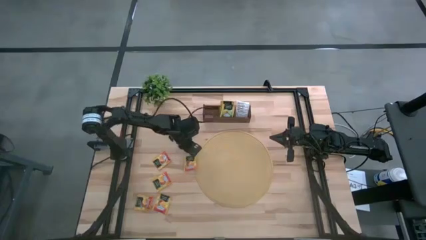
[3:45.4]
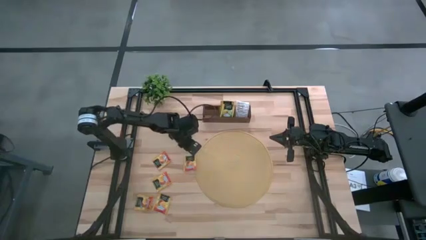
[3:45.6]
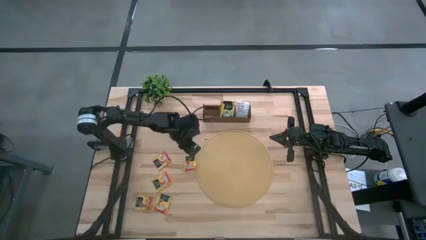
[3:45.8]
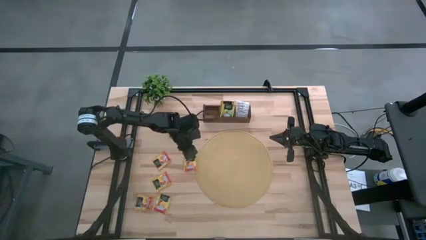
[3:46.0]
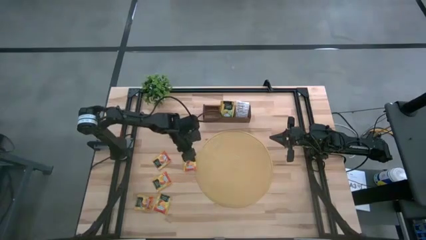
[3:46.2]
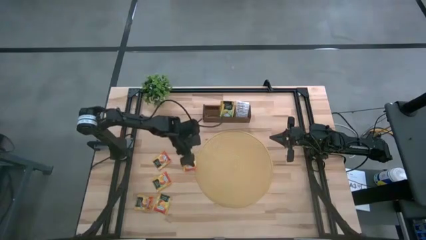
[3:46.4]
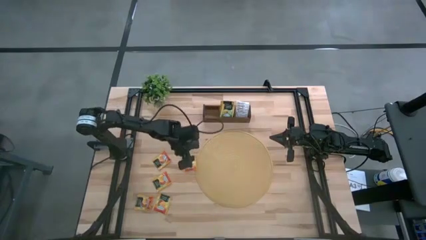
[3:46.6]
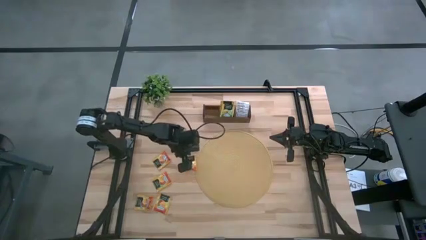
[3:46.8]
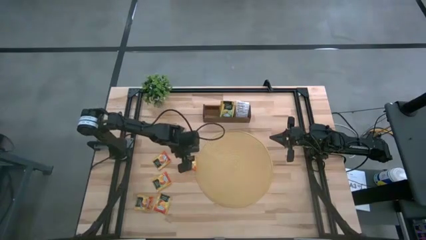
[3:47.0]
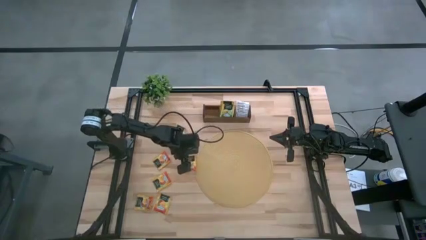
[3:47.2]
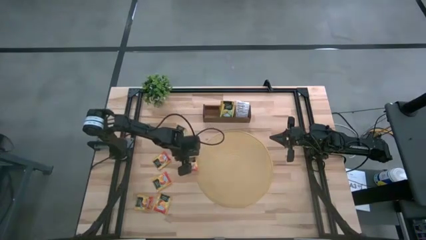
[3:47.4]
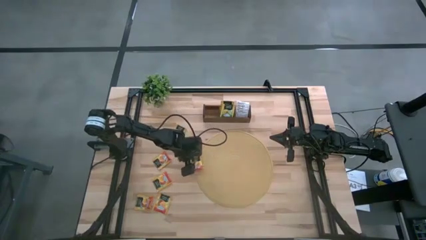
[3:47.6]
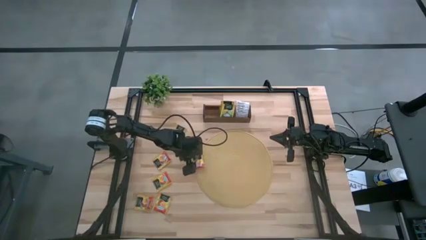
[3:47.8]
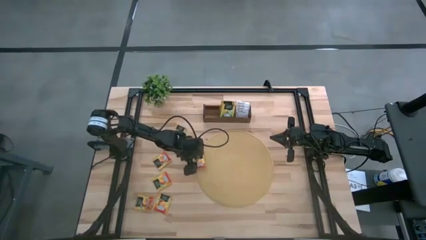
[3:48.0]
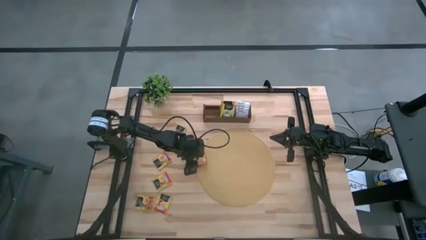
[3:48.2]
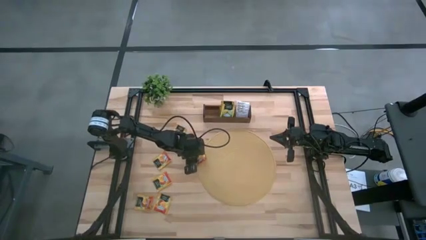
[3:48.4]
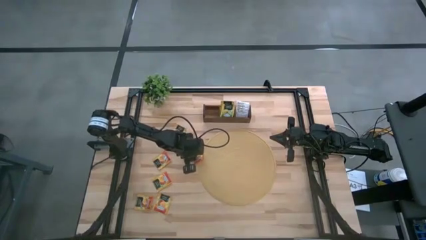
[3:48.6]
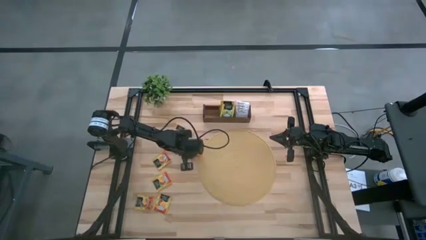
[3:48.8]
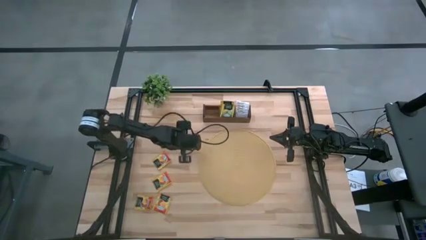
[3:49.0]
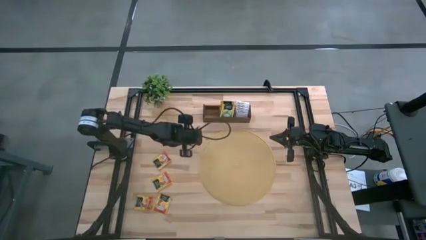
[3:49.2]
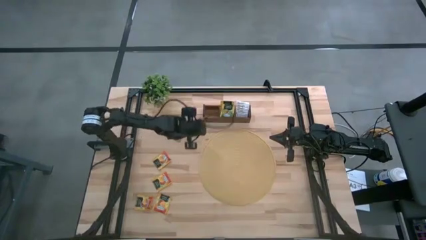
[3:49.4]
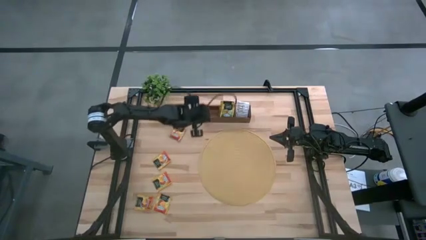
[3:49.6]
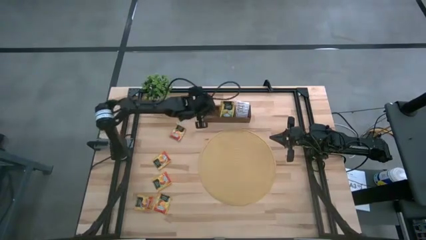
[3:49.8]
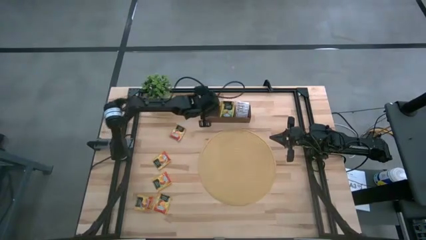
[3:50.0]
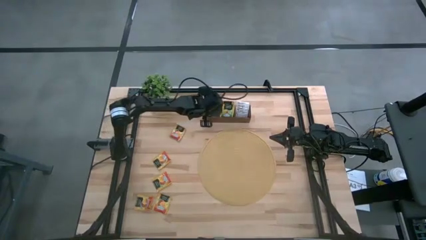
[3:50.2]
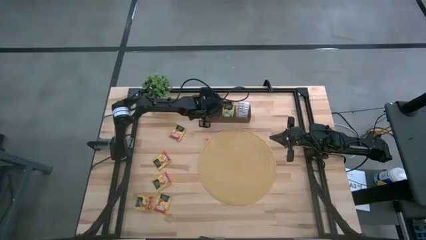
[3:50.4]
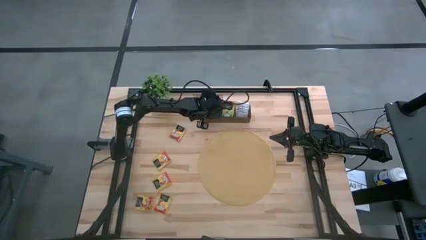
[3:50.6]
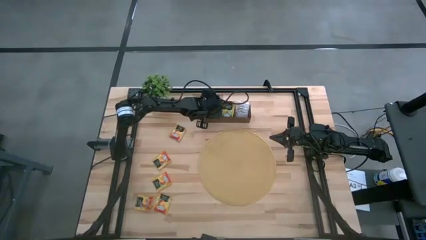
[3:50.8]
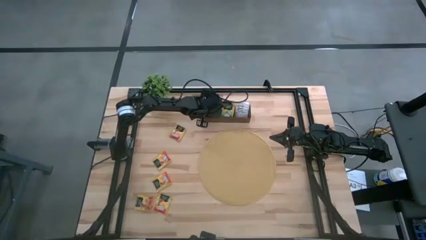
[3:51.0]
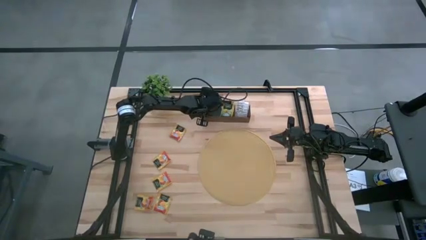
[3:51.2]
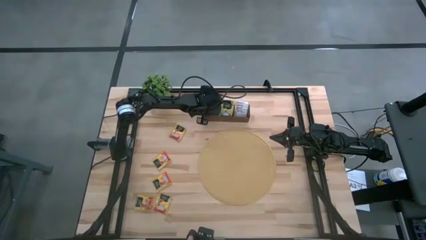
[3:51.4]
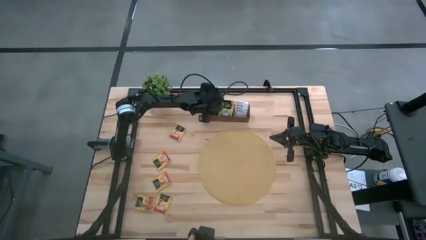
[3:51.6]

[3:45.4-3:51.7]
Task: Pick & Place Tea
Put the orange tea bag into the left section of the wooden organizer

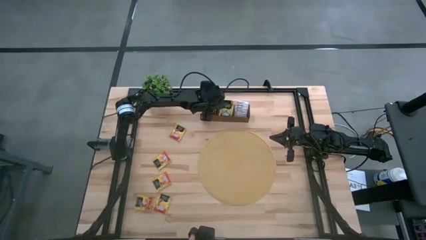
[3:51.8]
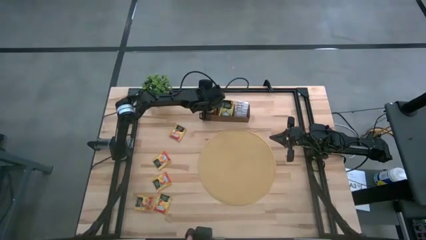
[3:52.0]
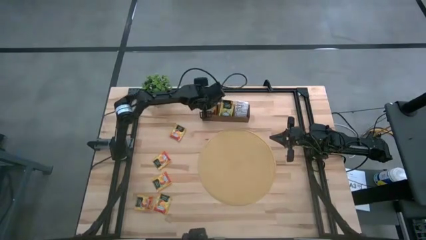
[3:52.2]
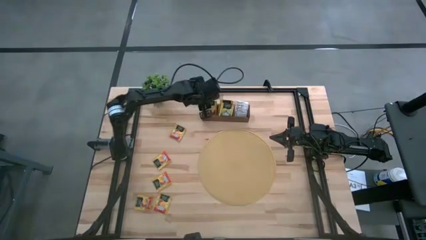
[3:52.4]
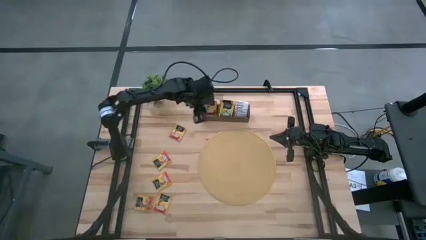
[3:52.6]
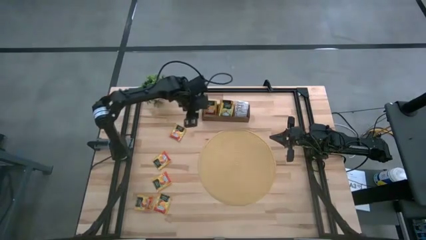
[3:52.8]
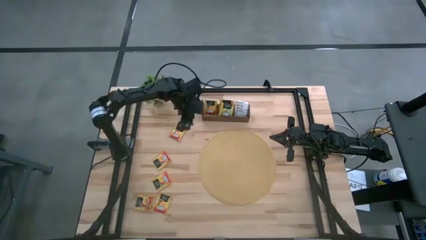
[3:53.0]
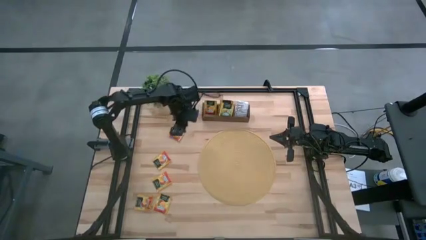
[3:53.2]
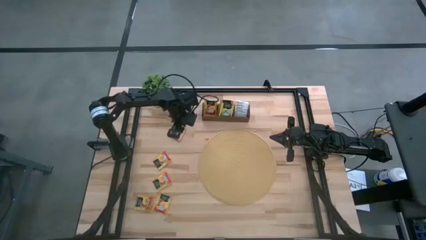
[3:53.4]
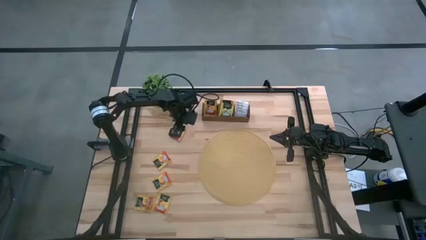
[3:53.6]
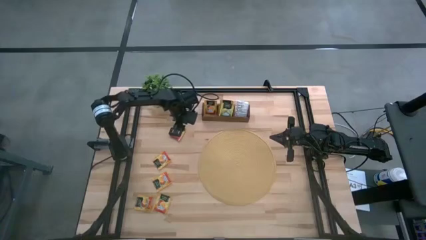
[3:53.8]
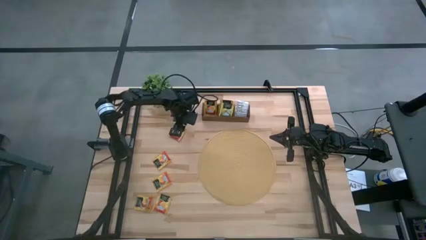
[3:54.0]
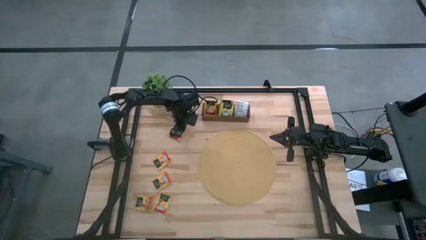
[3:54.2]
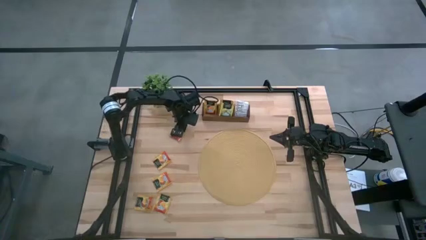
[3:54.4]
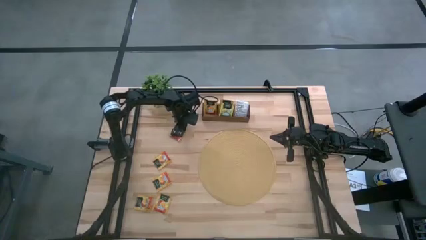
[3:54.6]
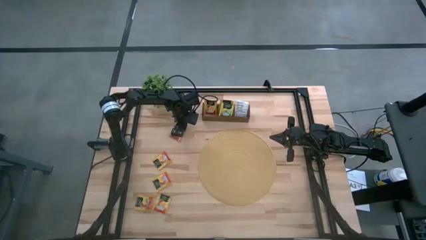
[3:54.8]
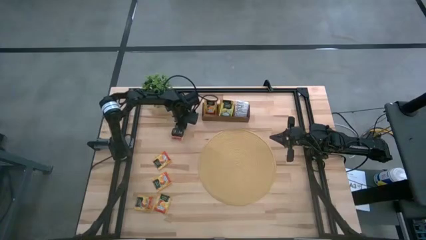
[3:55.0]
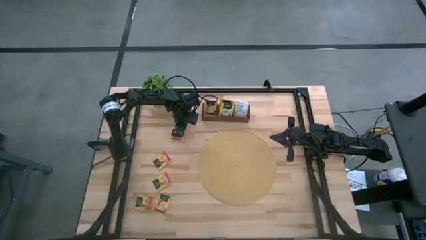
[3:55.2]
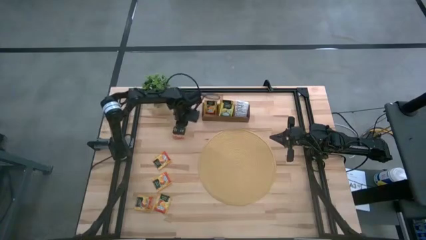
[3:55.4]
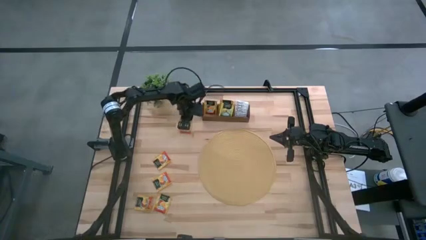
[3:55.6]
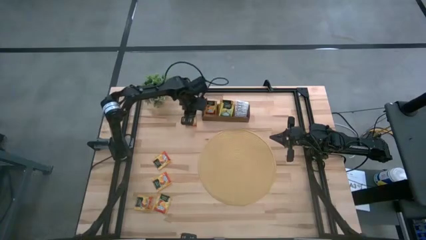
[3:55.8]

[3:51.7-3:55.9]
Put the orange tea bag into the left section of the wooden organizer

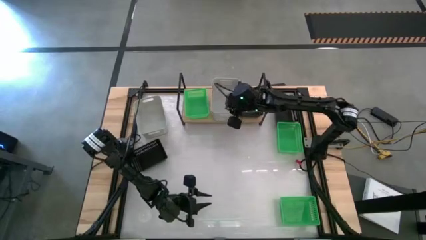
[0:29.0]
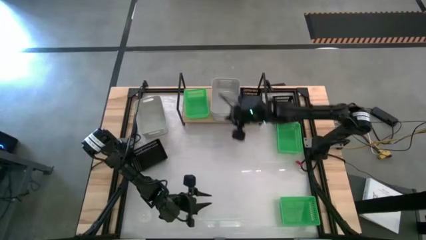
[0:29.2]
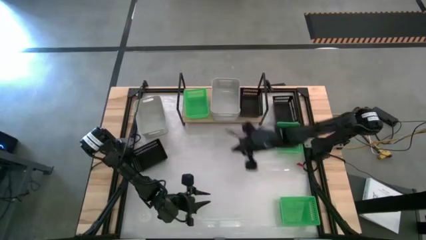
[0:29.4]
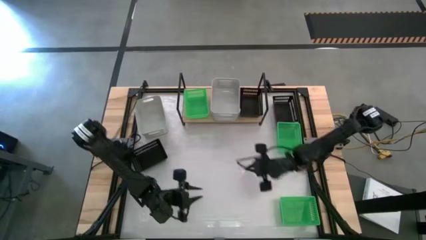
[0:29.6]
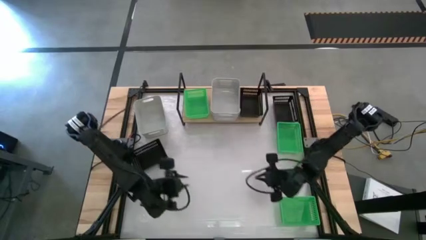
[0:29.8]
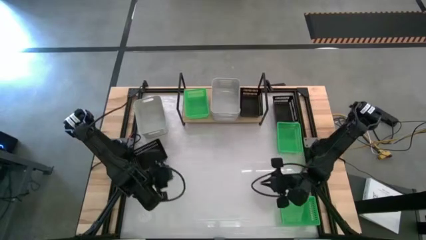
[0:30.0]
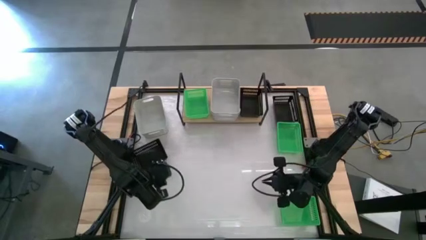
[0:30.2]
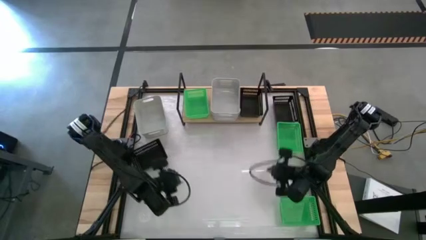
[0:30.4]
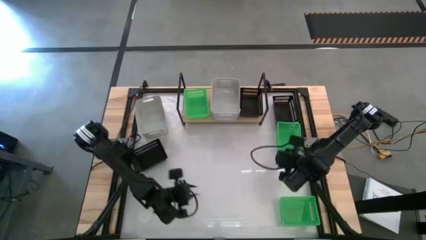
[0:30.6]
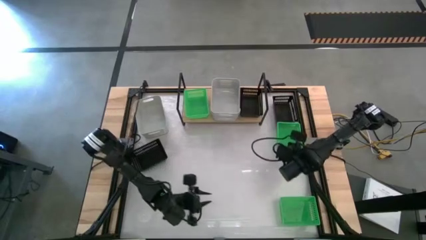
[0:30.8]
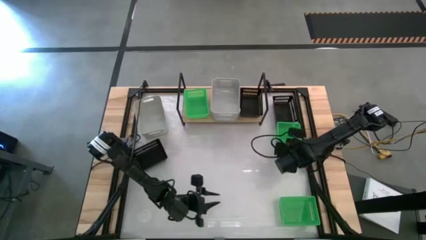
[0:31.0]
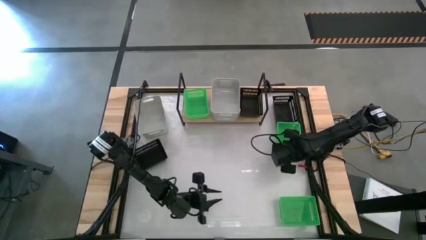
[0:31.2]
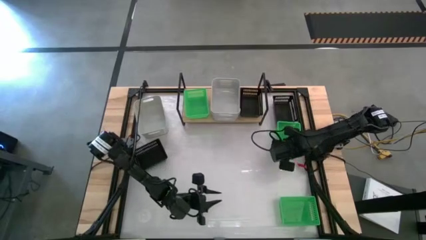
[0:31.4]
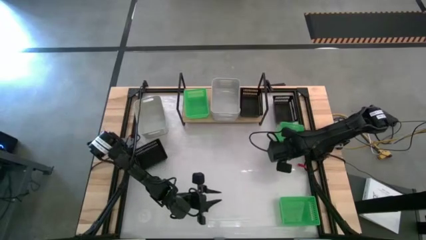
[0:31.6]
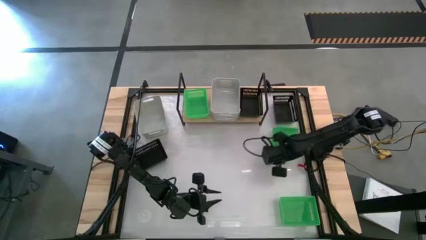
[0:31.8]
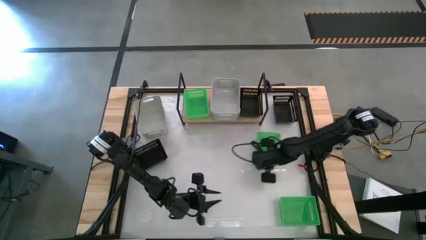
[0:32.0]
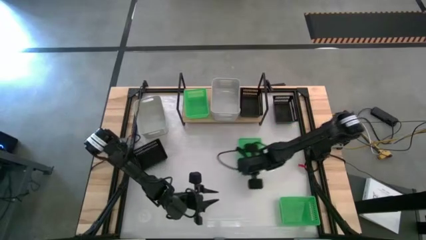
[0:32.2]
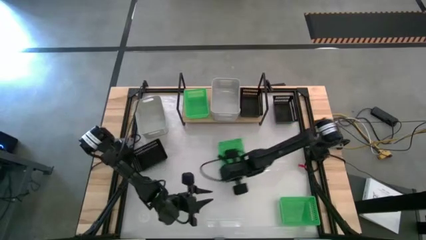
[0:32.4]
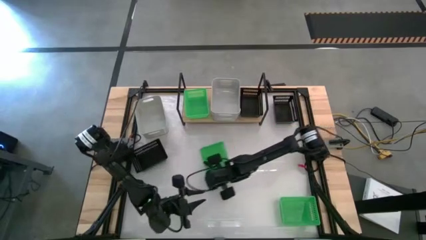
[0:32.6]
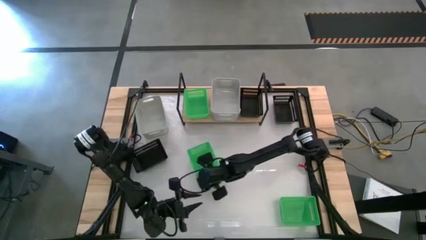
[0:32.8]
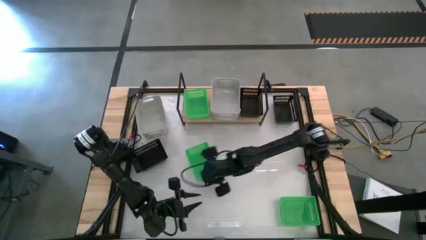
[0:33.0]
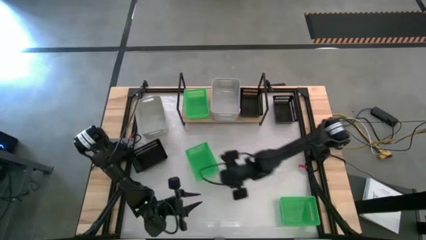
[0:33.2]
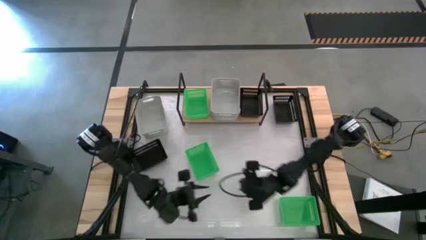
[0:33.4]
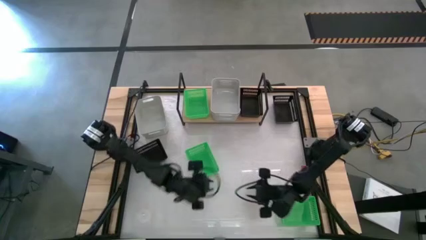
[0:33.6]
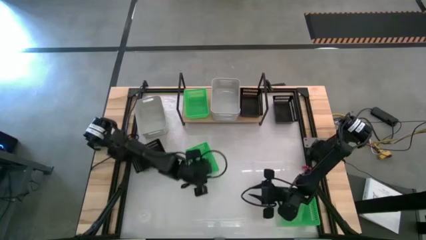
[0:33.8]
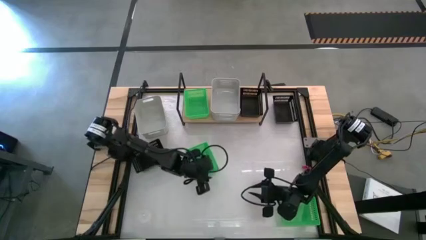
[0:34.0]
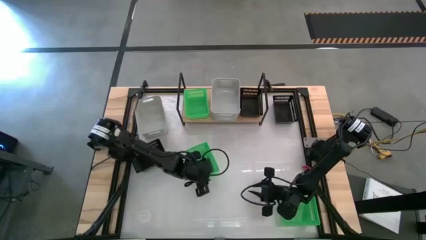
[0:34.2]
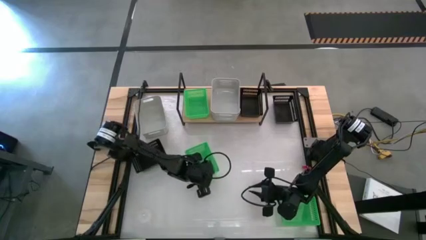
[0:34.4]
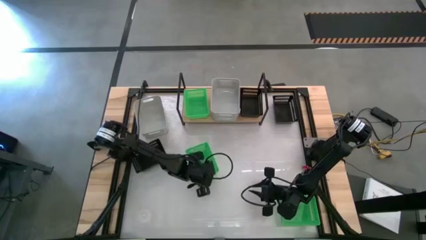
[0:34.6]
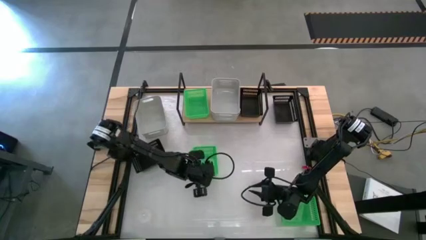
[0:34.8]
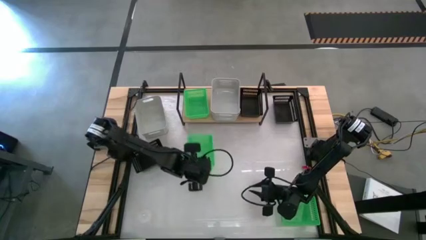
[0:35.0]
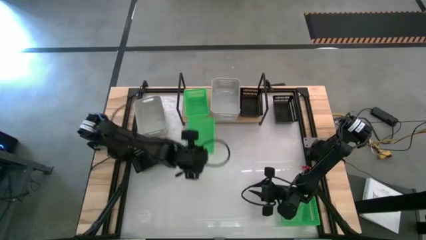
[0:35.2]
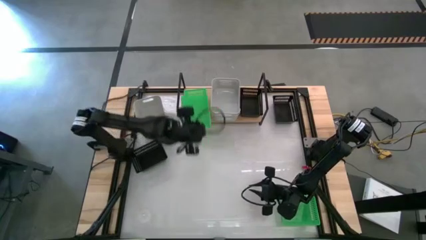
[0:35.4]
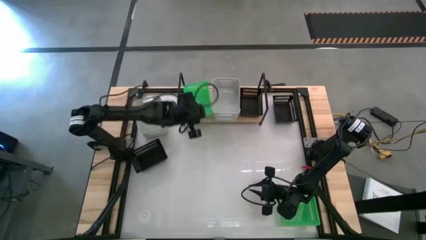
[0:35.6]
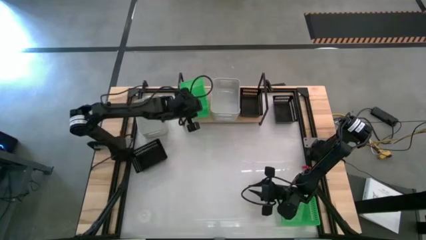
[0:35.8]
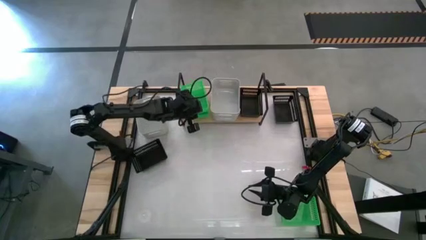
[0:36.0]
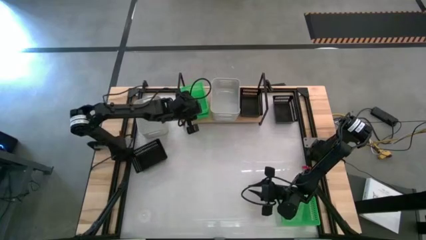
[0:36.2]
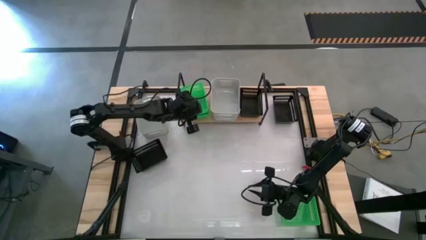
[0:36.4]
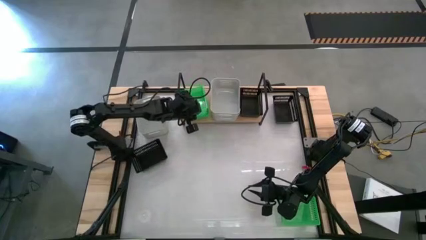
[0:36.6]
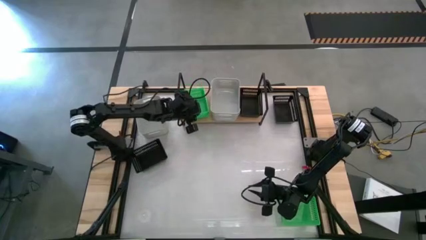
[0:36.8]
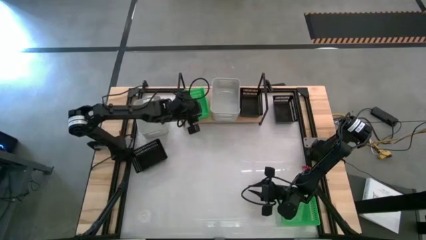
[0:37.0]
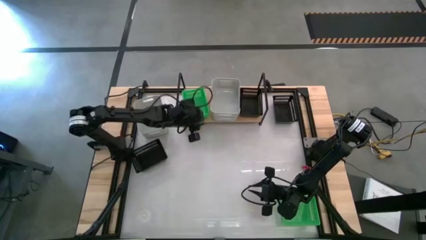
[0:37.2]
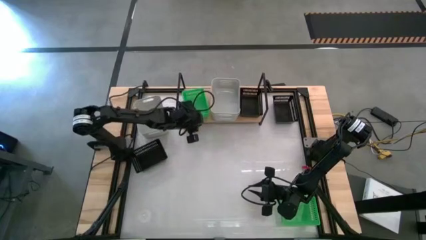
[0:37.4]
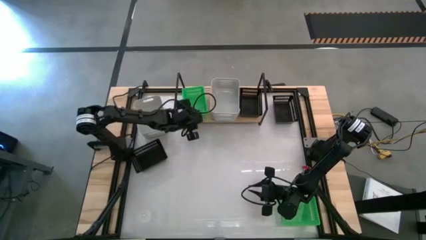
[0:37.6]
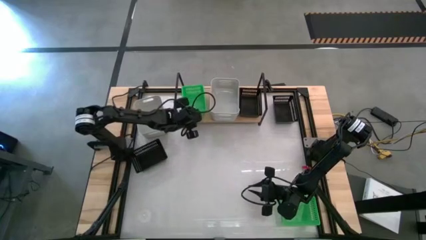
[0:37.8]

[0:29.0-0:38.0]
Task: Stack baskets on shelf by color
Stack the top green bin on the green bin on the shelf
